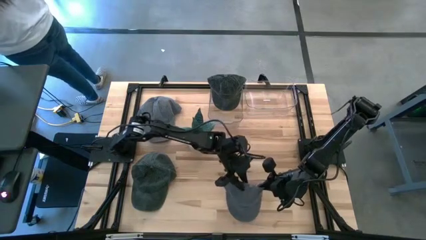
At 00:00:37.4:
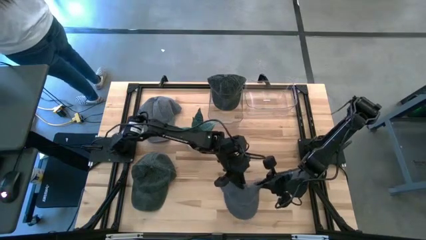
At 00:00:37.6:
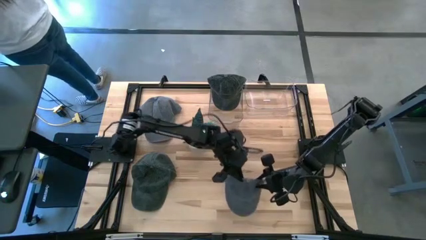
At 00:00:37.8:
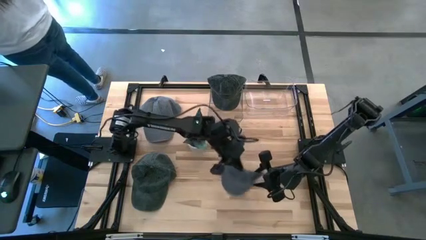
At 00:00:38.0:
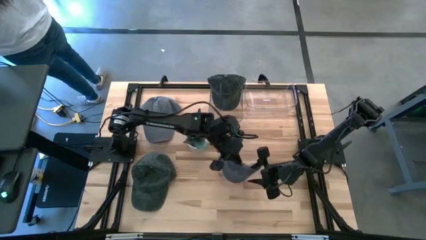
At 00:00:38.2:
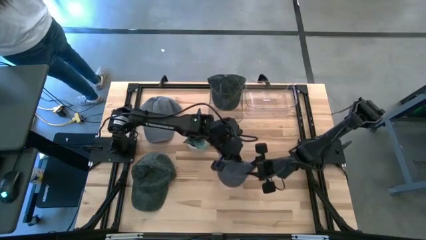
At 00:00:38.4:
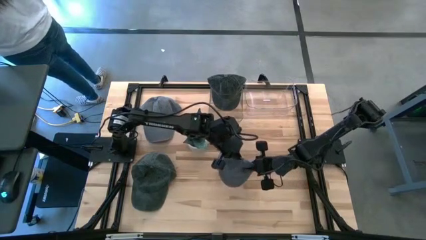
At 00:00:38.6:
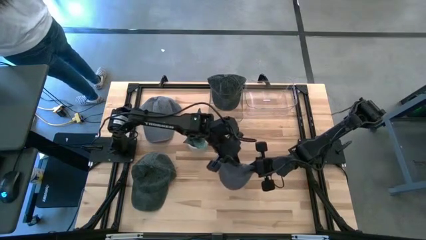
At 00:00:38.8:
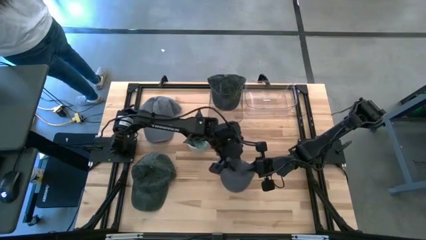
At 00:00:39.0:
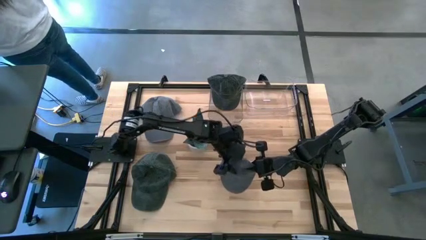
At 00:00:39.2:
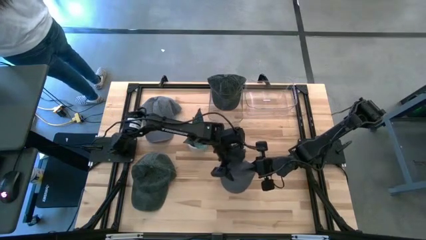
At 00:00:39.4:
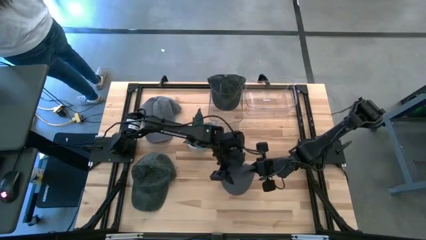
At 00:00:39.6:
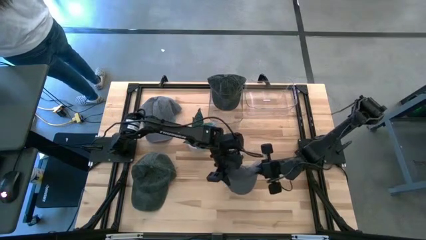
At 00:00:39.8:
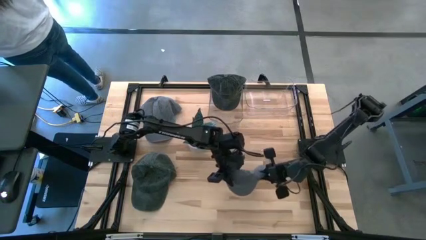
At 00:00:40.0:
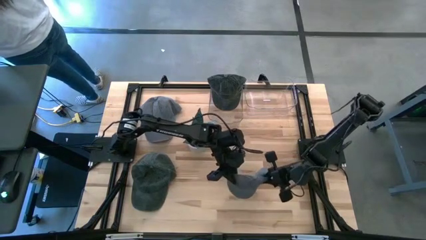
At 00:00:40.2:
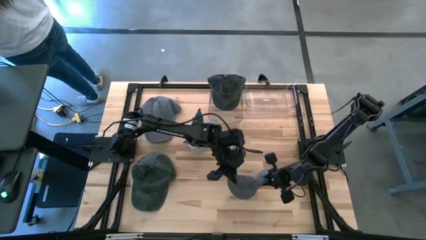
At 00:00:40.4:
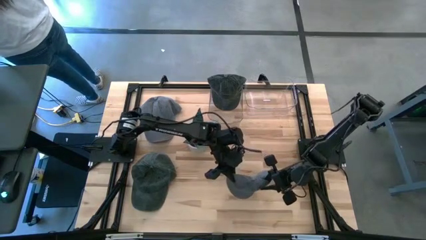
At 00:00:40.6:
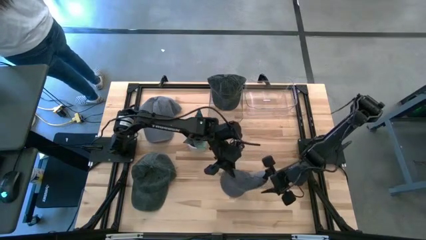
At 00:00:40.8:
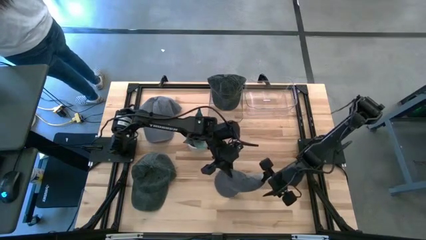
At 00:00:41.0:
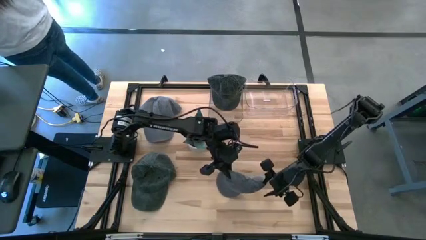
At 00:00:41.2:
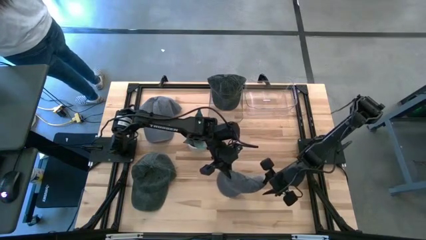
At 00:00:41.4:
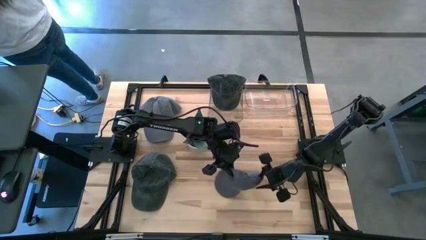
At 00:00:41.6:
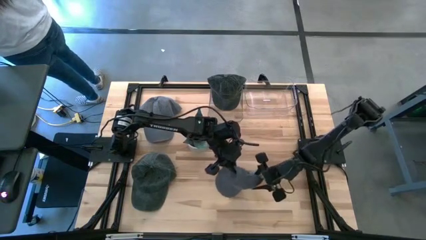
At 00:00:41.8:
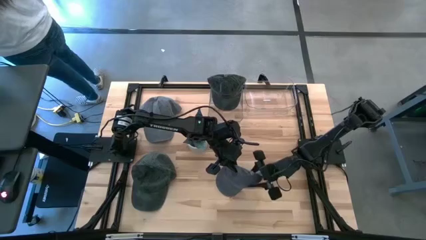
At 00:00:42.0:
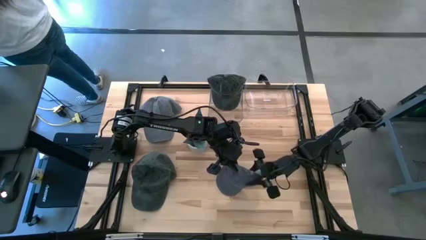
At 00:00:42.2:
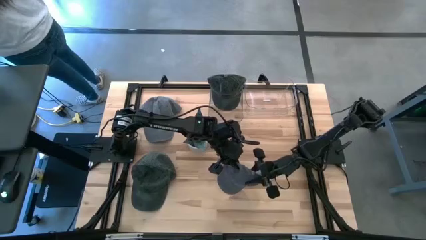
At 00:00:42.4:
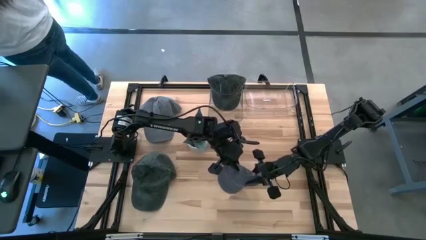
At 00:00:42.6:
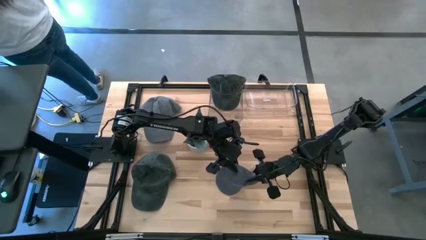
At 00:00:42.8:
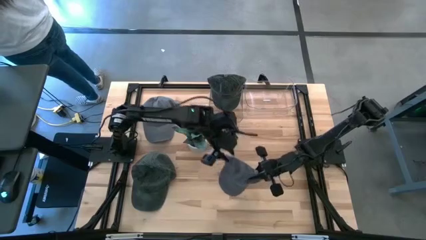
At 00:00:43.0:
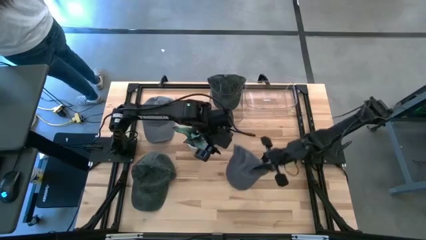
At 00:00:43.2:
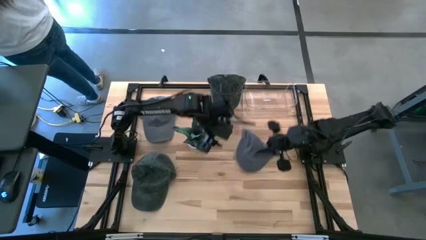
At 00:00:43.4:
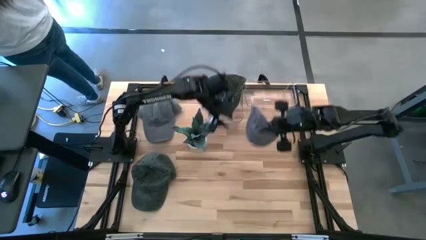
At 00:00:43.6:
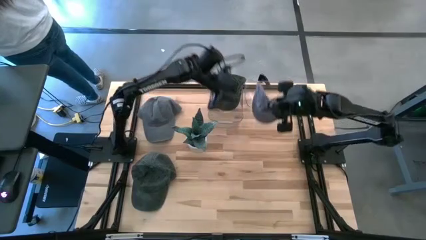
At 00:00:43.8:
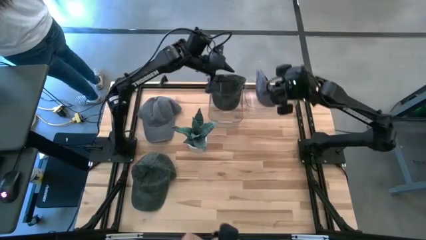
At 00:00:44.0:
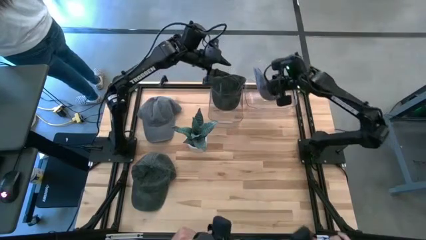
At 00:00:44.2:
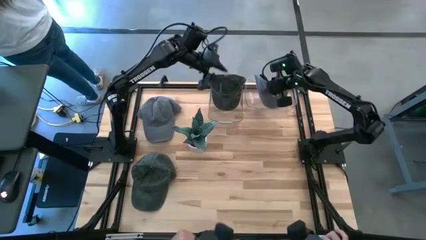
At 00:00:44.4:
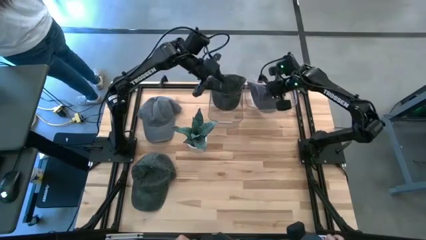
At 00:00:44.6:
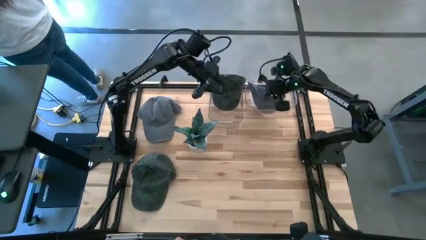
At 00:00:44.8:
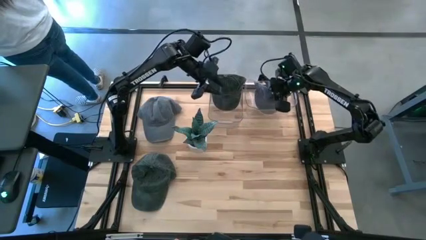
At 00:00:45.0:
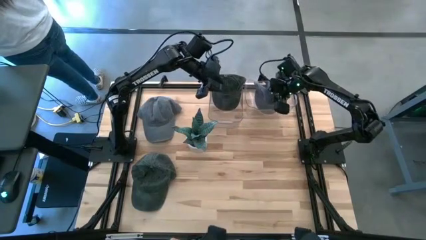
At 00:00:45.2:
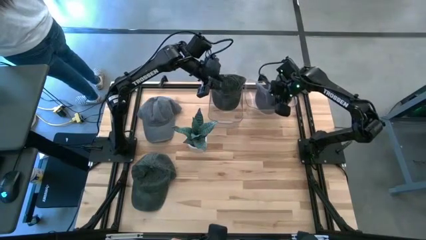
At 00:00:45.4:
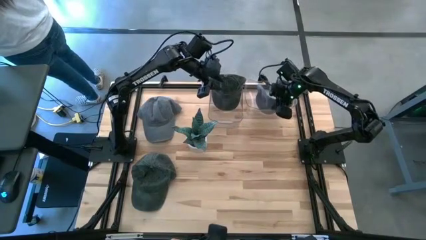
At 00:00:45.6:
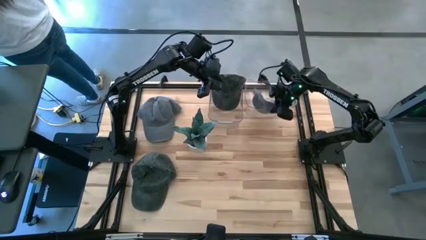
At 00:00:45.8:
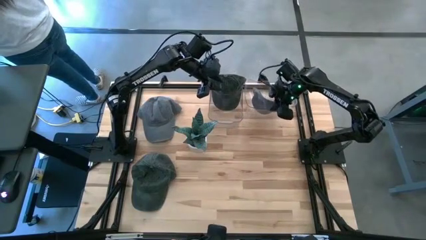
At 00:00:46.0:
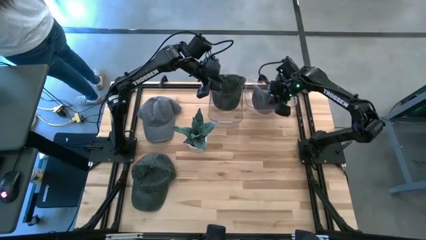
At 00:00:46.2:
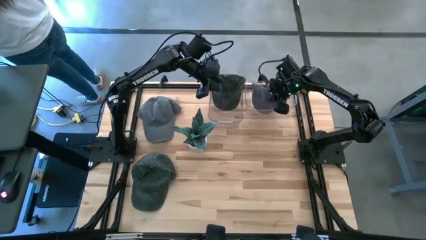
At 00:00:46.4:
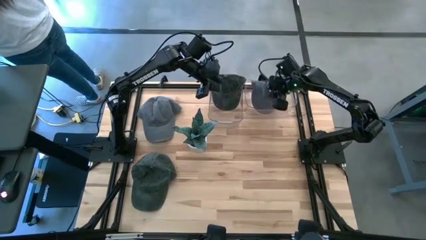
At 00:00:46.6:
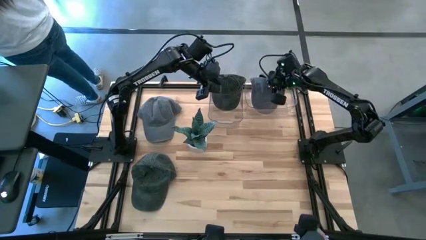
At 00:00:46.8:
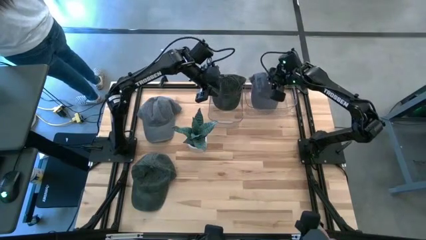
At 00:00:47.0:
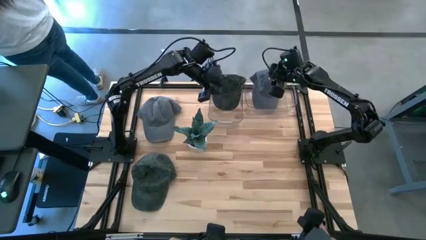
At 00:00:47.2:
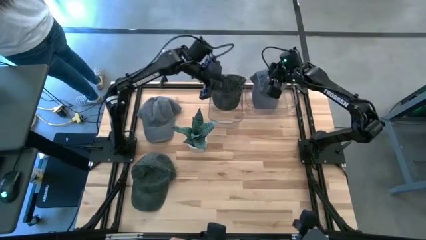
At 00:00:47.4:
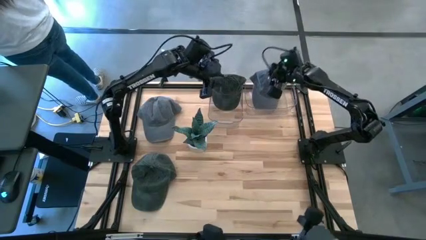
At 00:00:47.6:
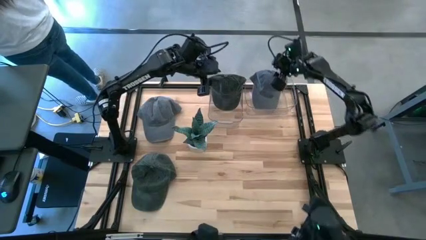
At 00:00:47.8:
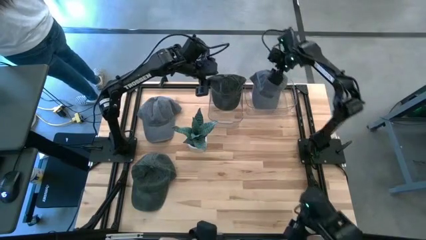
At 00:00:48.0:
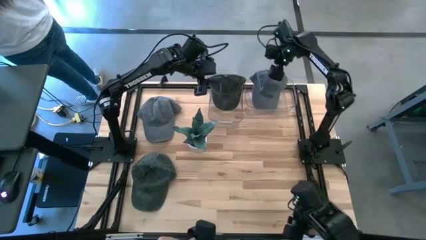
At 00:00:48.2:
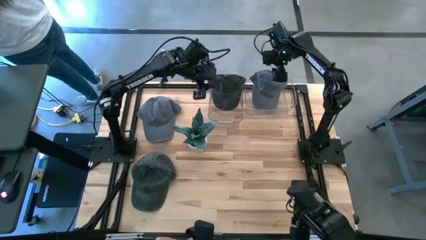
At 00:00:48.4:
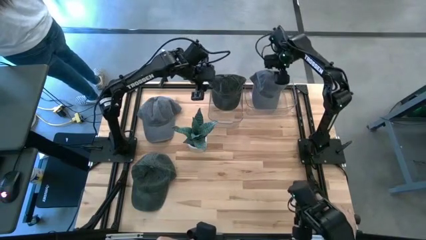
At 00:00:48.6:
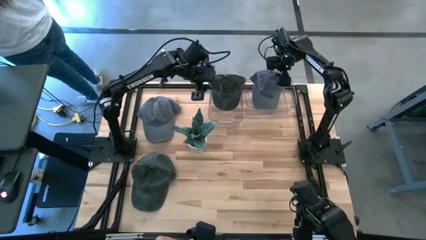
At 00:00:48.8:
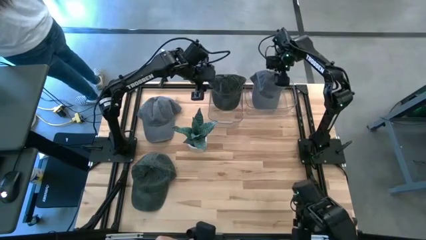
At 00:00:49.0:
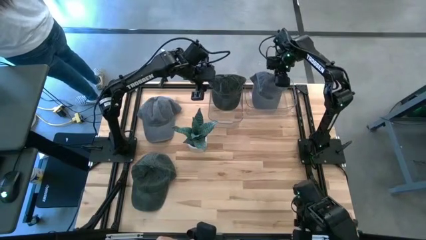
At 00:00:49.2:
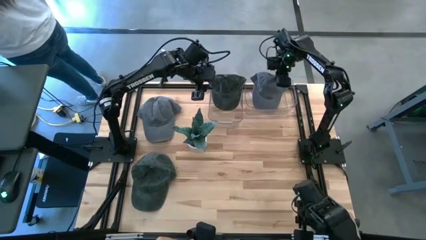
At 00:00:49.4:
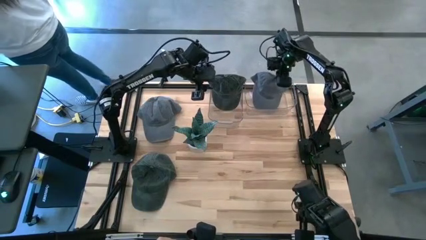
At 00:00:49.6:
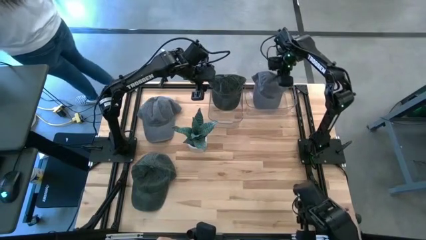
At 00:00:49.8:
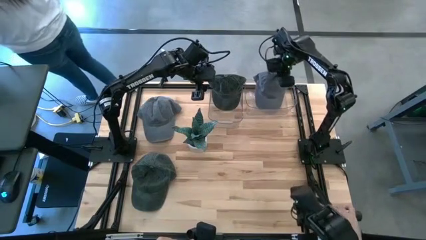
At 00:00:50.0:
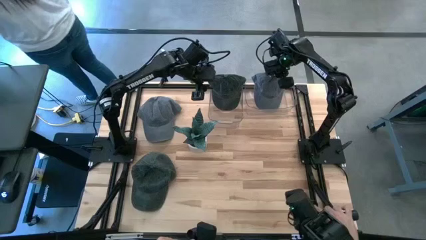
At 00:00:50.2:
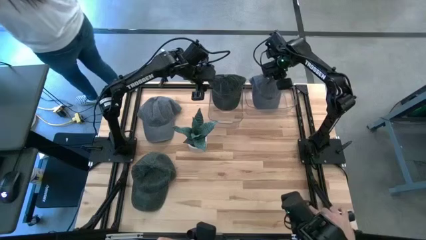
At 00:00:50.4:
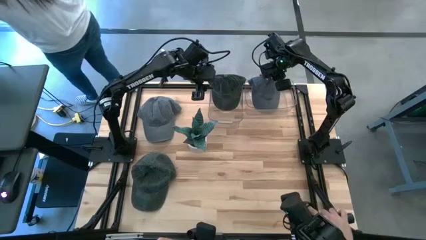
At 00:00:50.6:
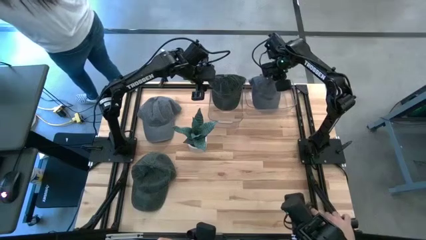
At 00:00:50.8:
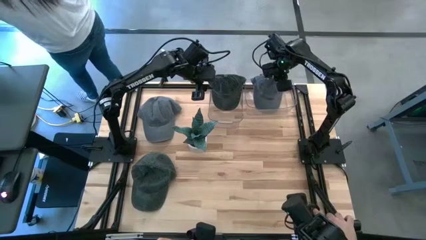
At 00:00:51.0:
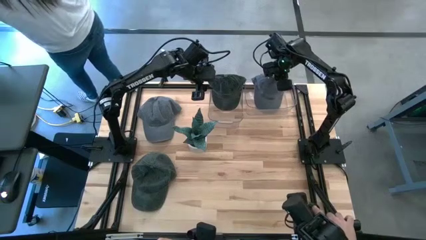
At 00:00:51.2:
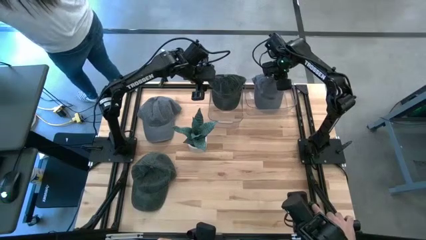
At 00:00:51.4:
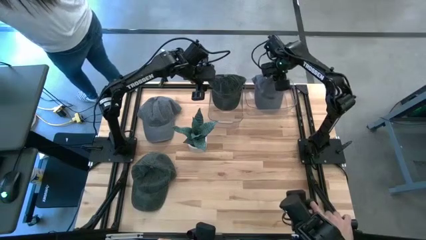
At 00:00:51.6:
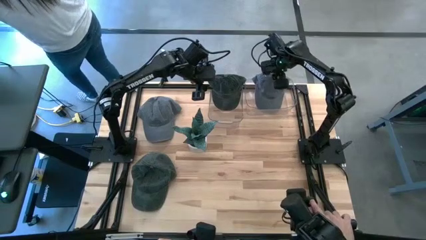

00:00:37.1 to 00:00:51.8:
Task: Pick & Place hat
Put the bottom gray cap into the right transparent bin
